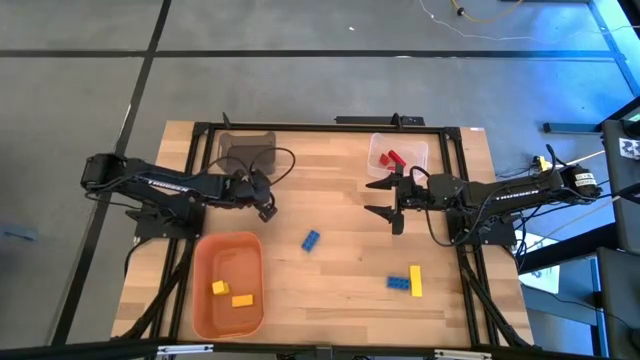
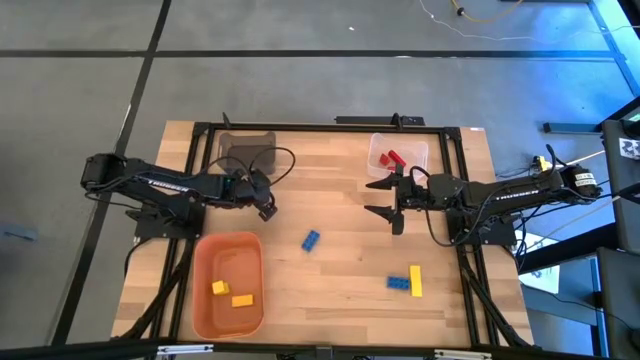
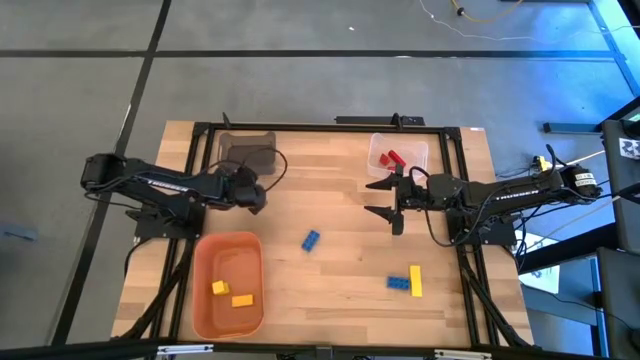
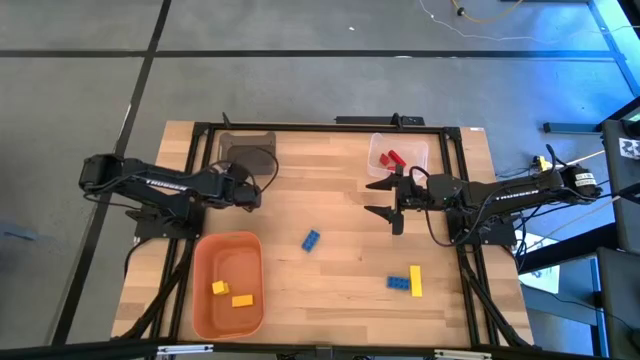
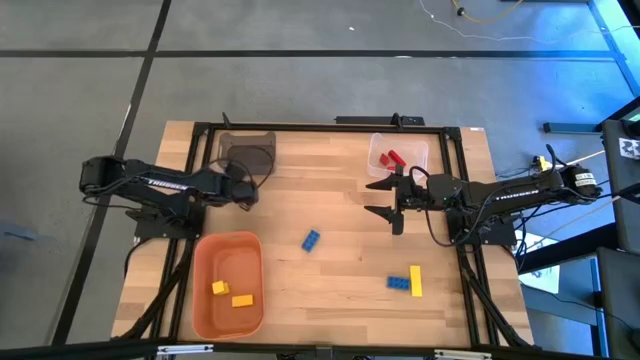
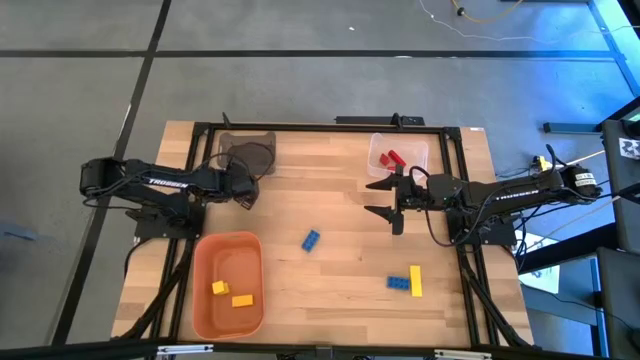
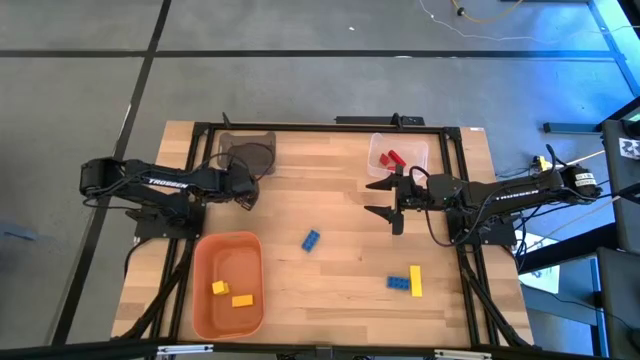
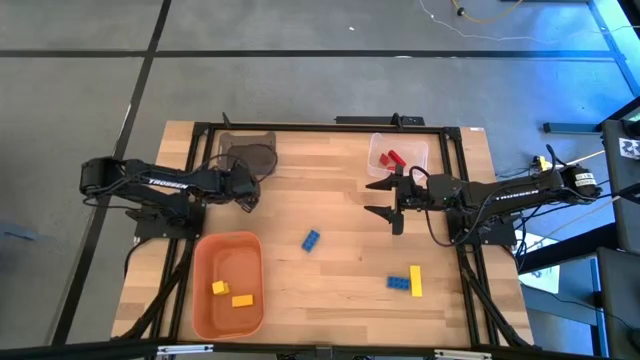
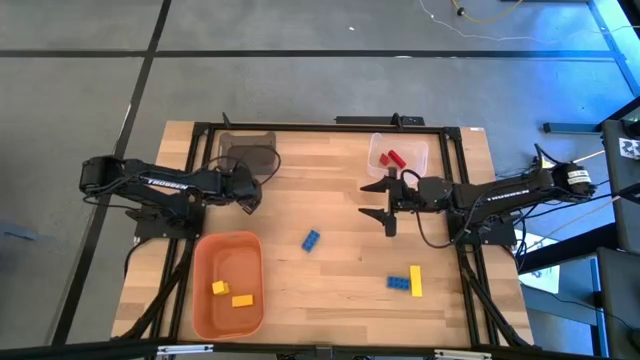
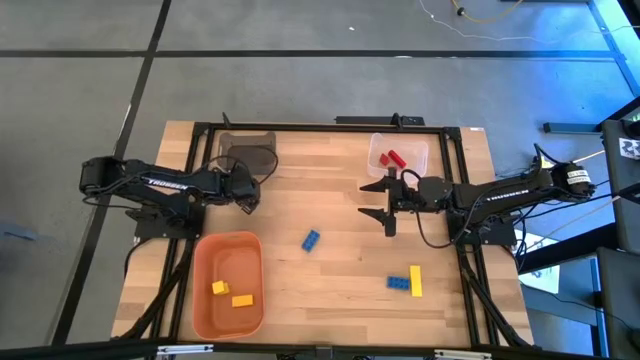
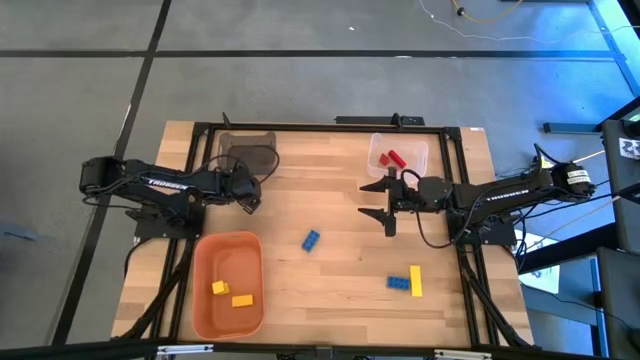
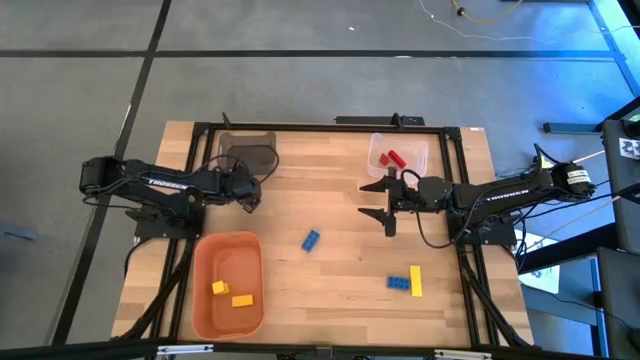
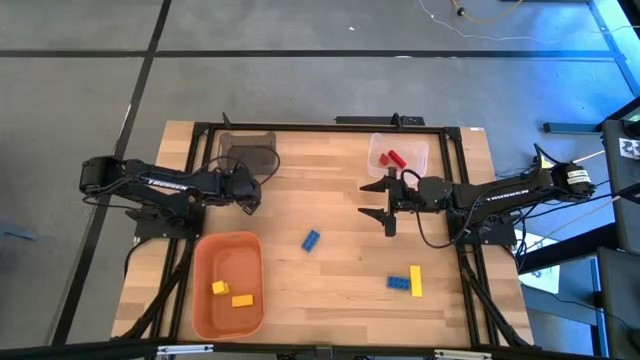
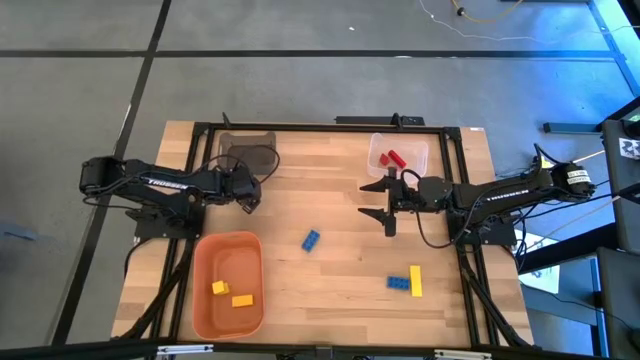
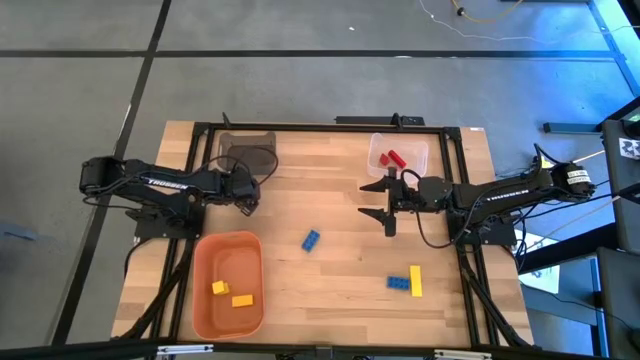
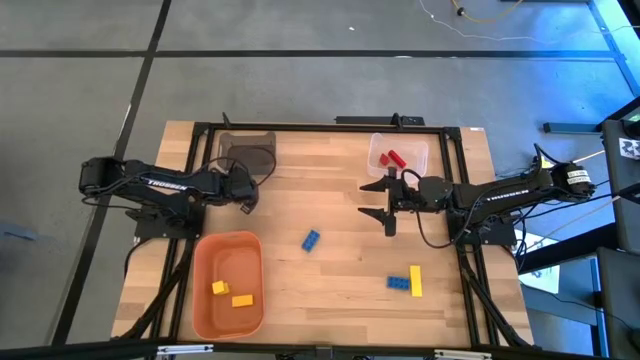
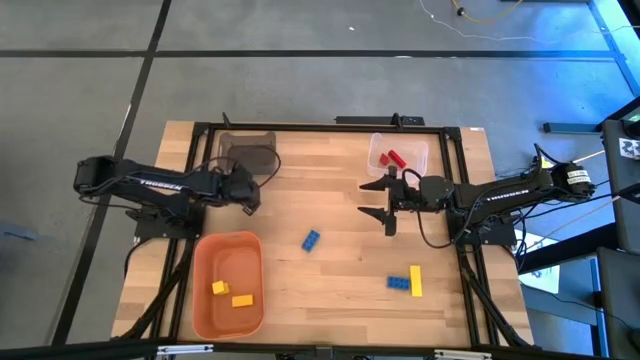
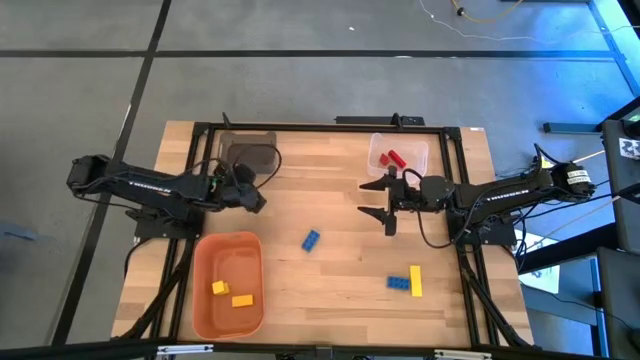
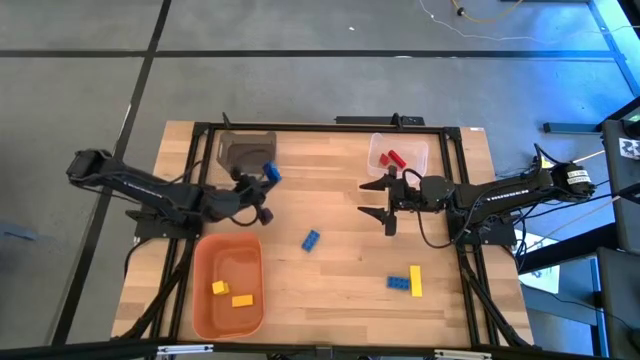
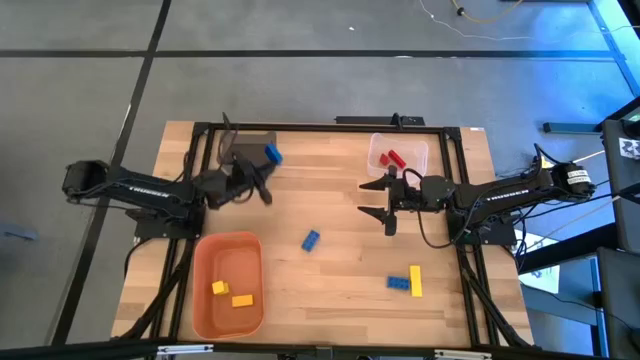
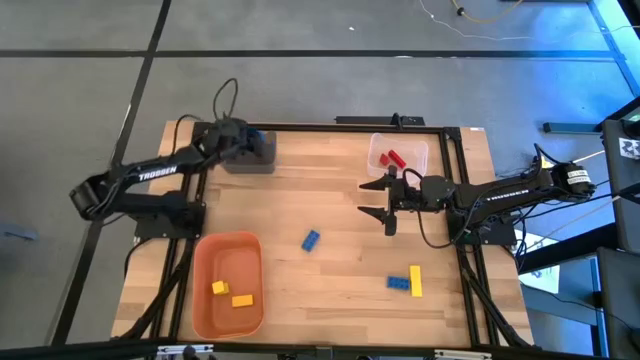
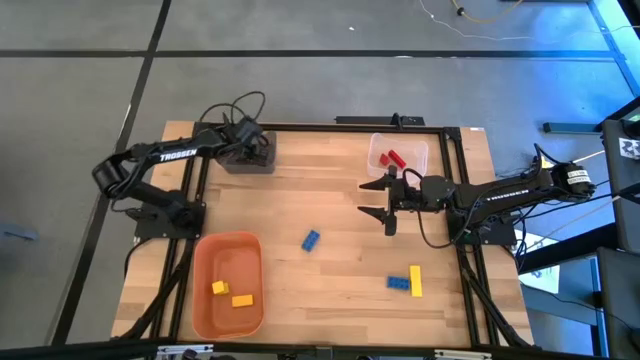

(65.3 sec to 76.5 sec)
Task: Sort & place blocks by color
Put the top left blue gamepiece into the black bin

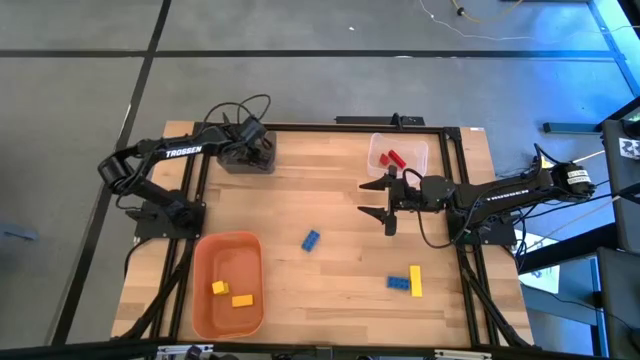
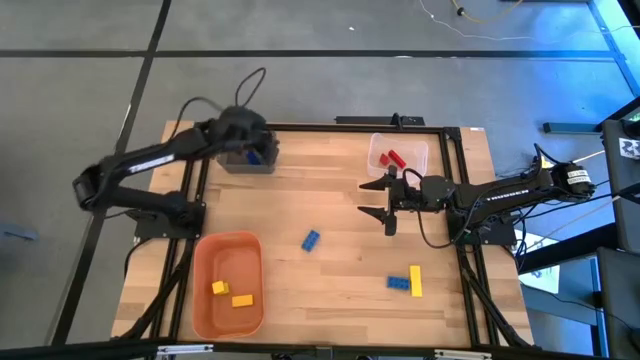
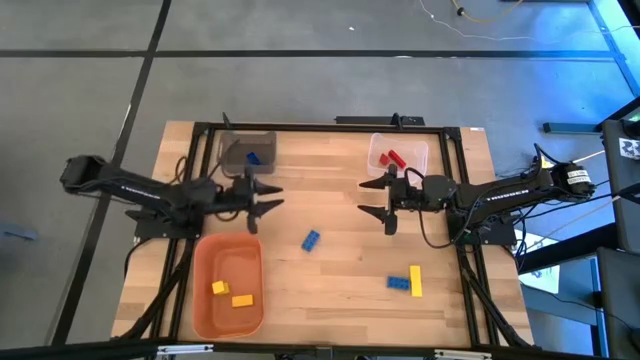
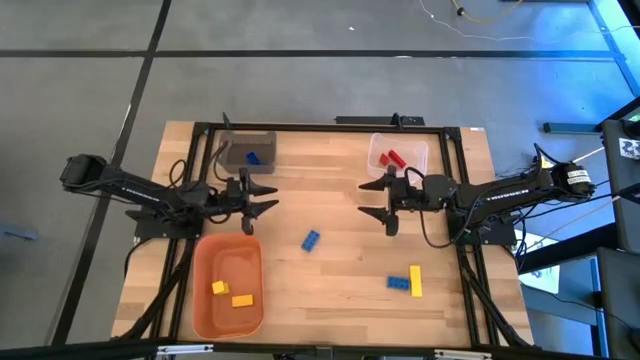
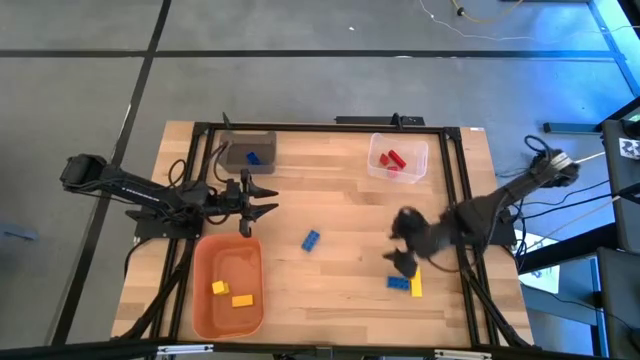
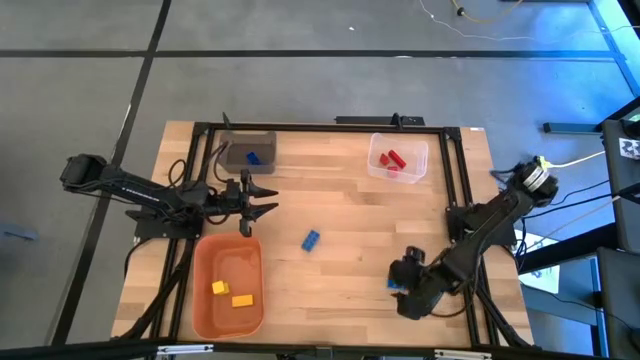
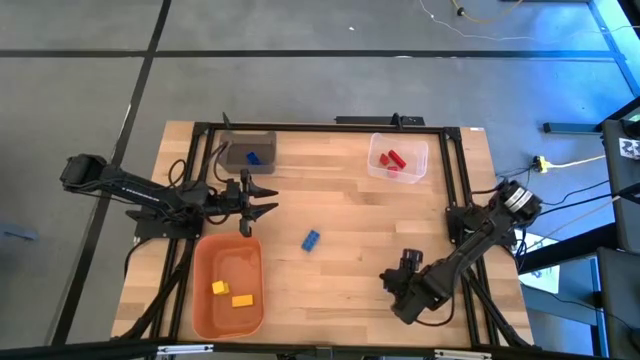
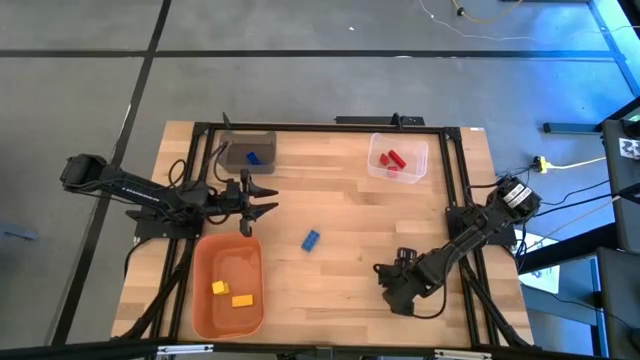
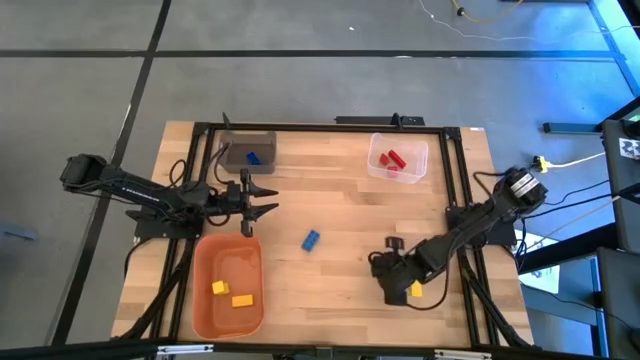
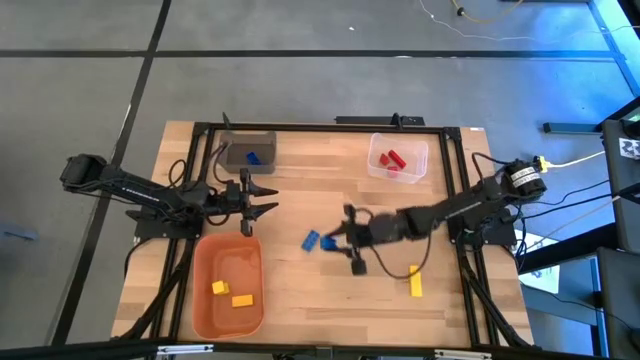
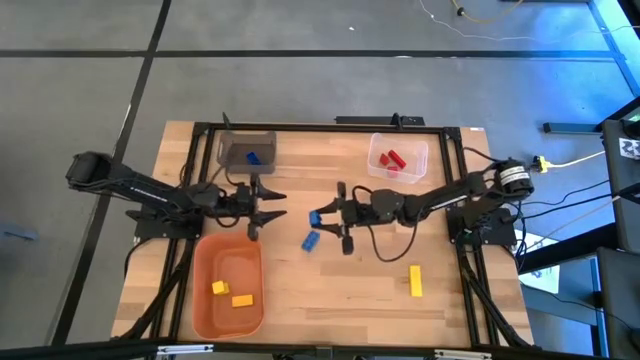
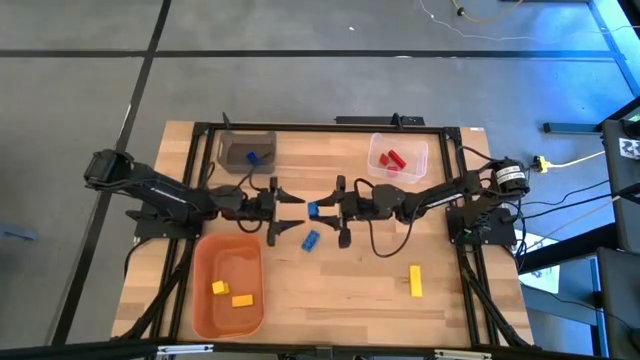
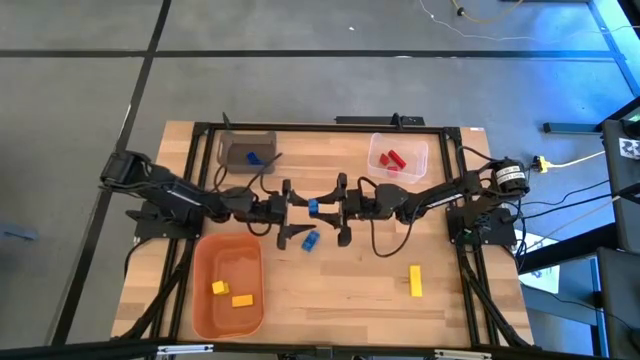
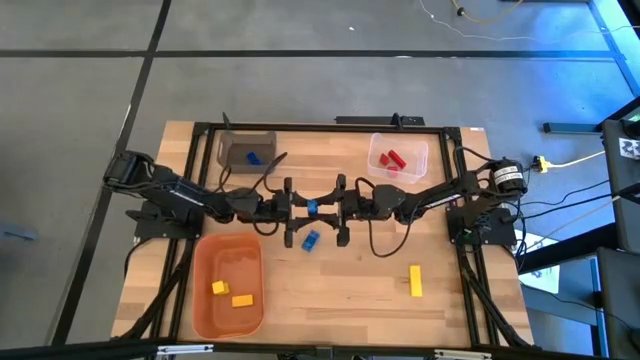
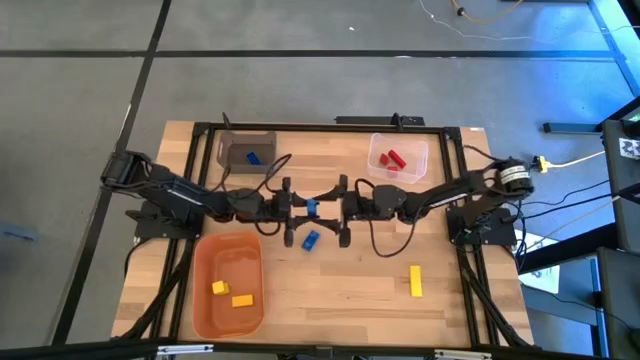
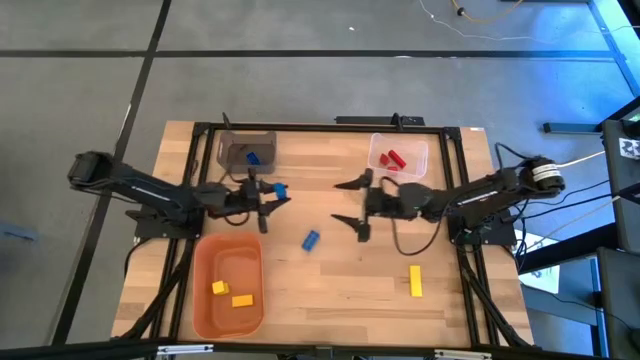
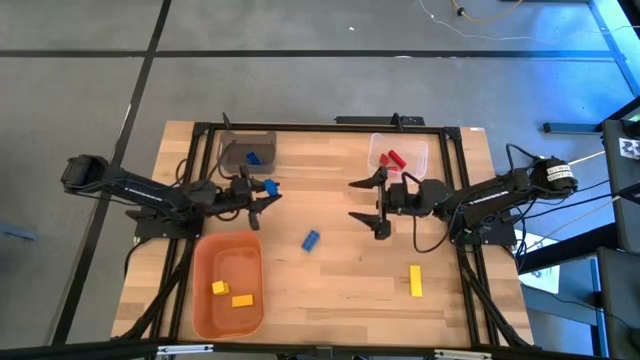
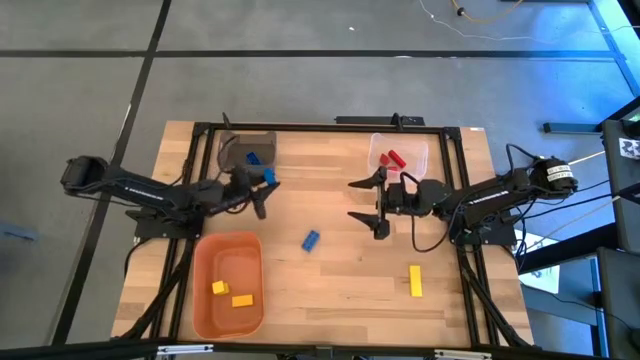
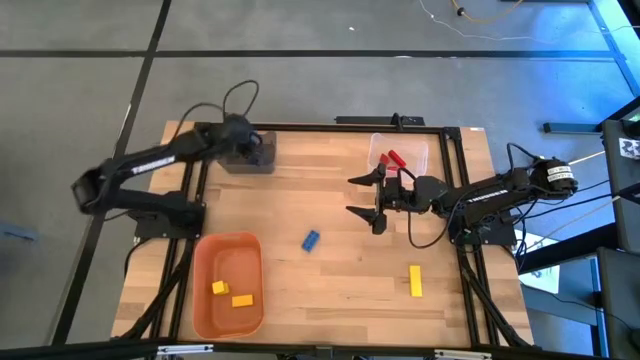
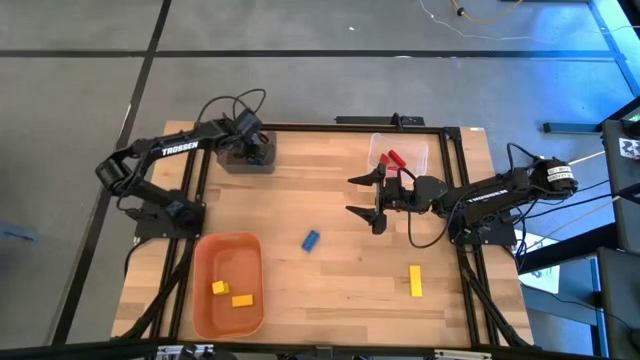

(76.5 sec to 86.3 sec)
Put the right blue gamepiece into the black bin

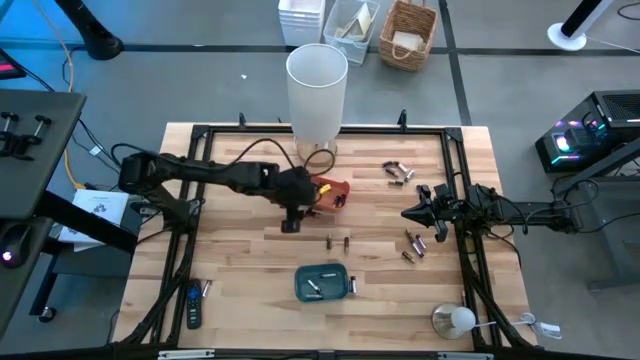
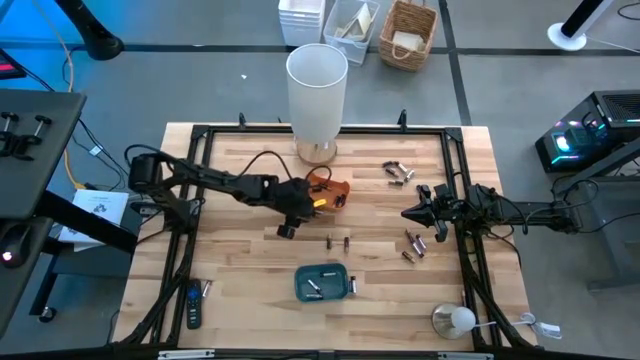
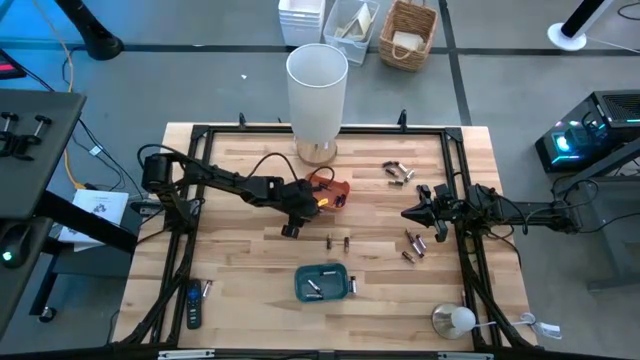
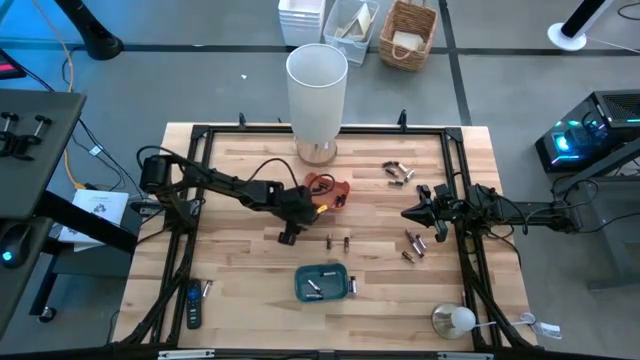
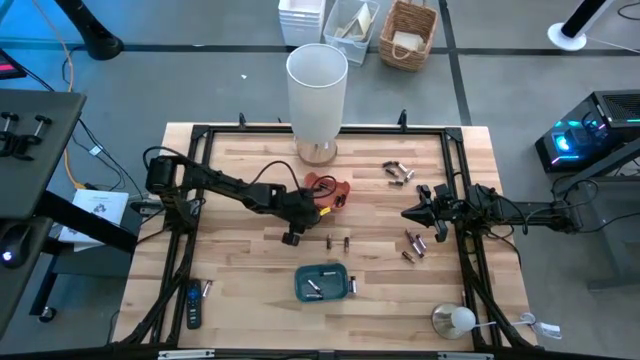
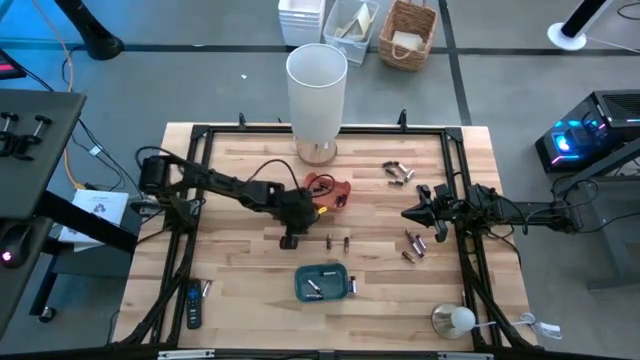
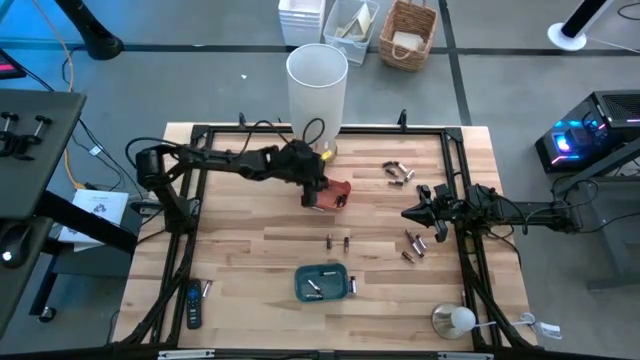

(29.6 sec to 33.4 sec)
Task: Sort batteries
Put the black battery into the orange bin
